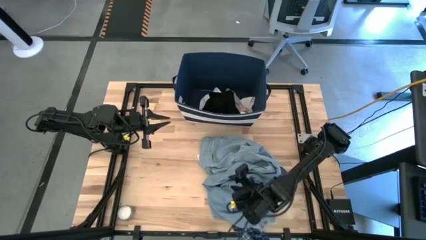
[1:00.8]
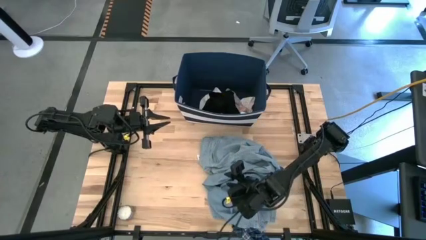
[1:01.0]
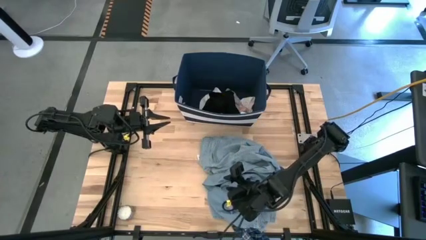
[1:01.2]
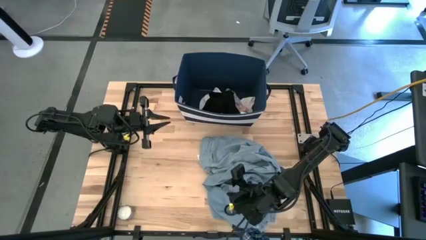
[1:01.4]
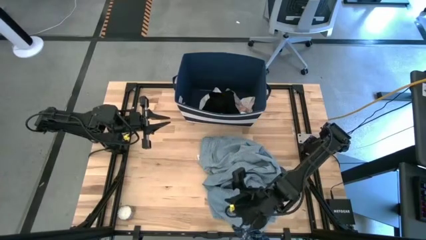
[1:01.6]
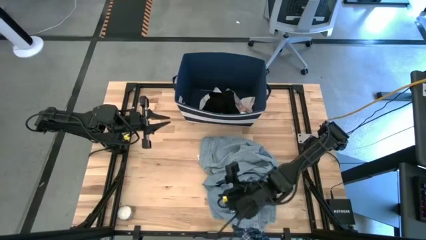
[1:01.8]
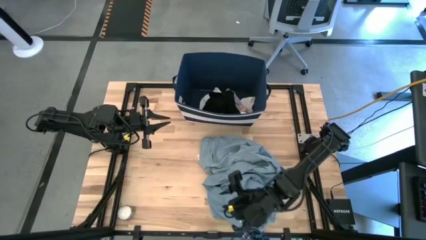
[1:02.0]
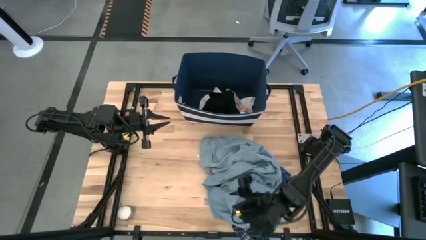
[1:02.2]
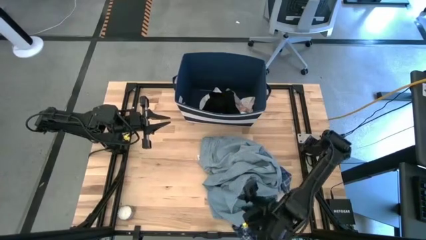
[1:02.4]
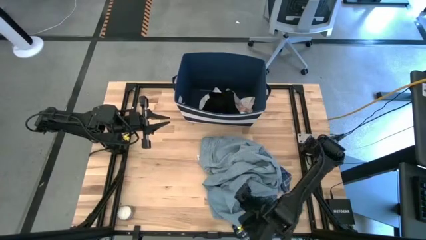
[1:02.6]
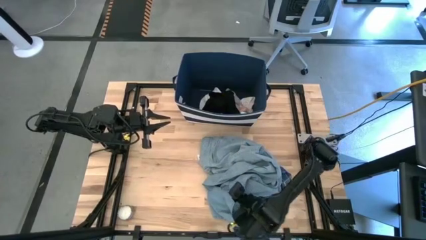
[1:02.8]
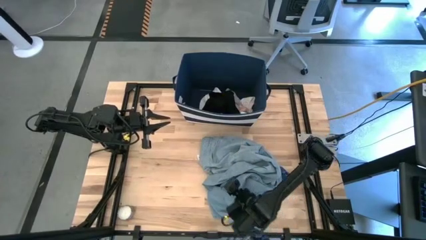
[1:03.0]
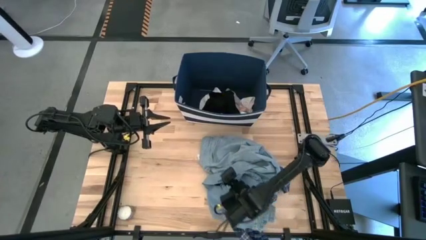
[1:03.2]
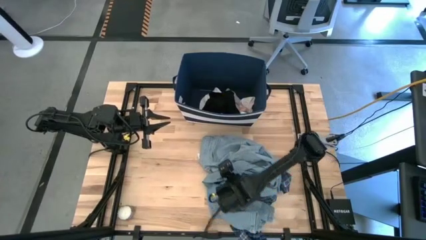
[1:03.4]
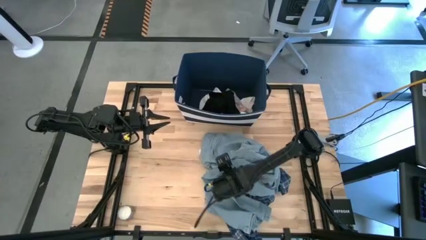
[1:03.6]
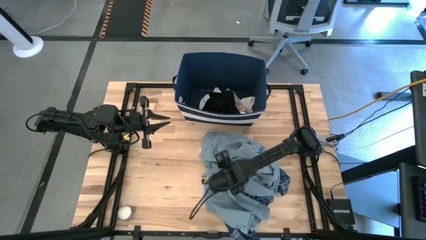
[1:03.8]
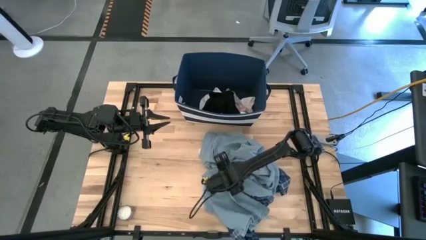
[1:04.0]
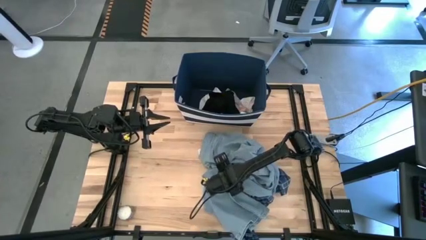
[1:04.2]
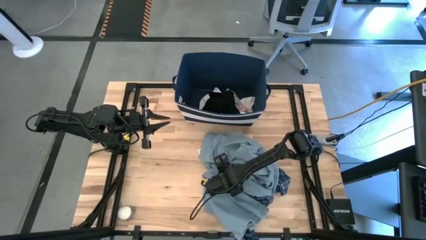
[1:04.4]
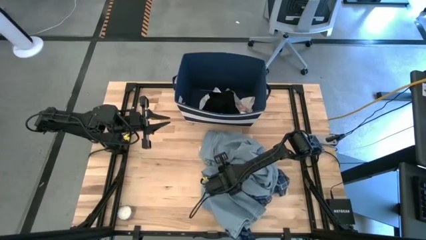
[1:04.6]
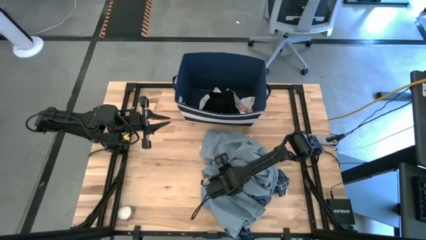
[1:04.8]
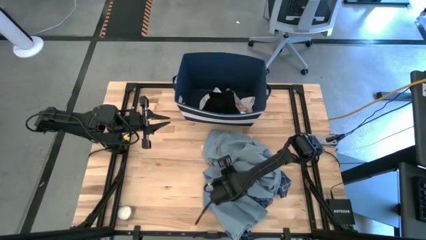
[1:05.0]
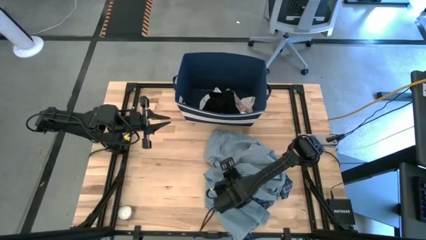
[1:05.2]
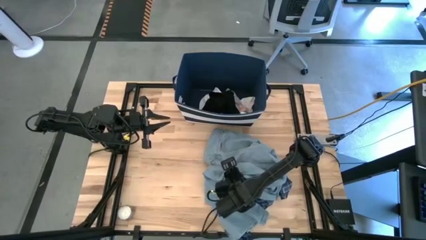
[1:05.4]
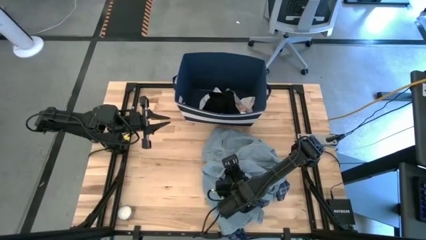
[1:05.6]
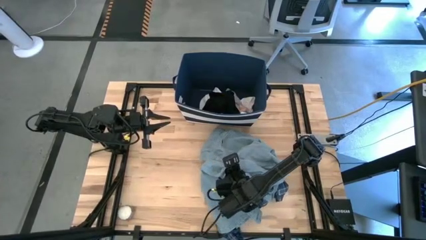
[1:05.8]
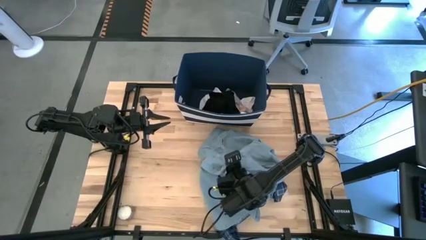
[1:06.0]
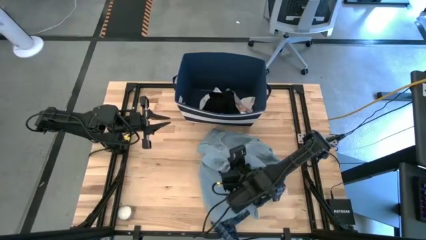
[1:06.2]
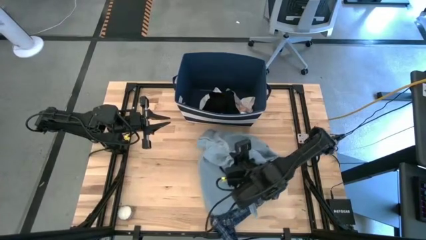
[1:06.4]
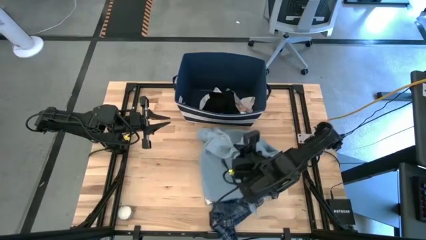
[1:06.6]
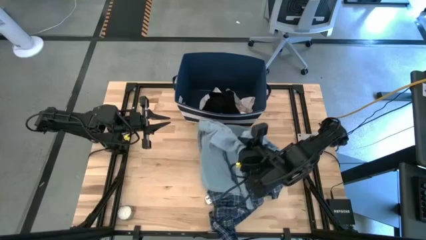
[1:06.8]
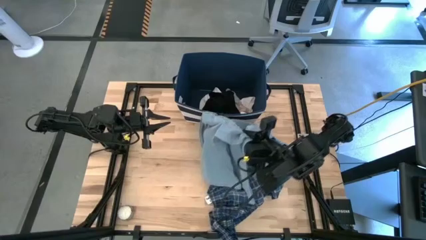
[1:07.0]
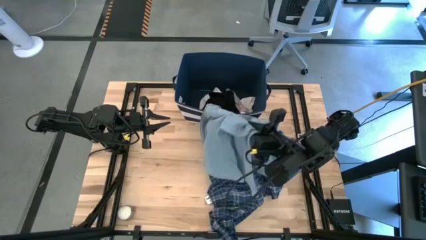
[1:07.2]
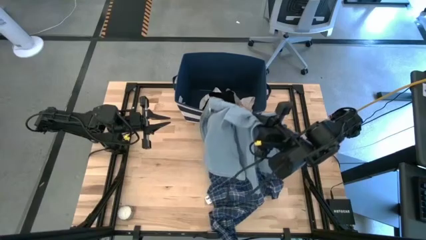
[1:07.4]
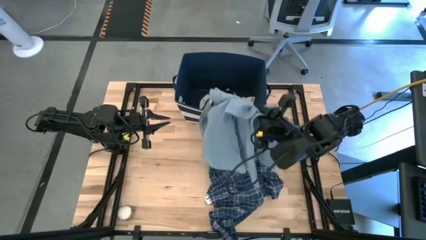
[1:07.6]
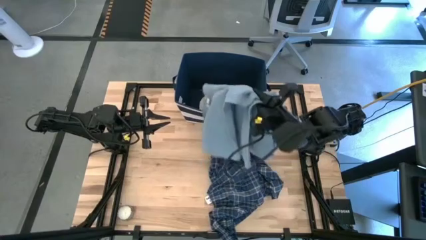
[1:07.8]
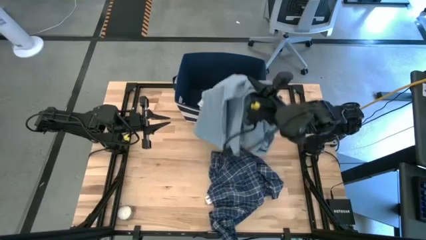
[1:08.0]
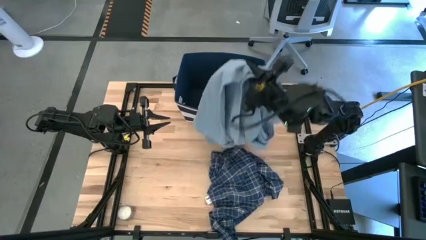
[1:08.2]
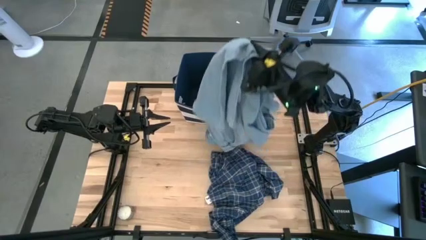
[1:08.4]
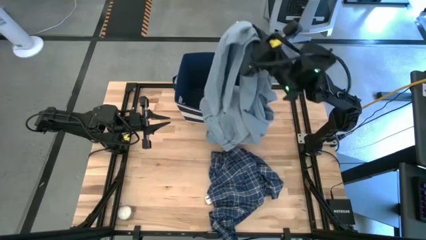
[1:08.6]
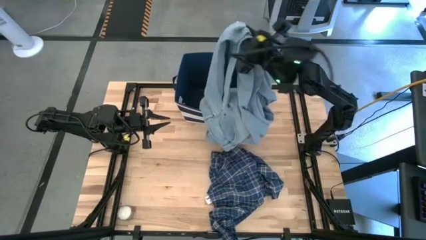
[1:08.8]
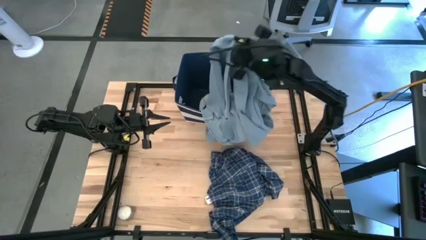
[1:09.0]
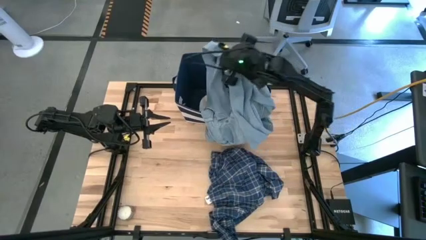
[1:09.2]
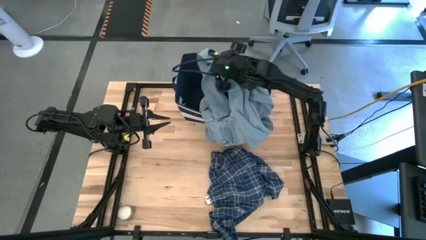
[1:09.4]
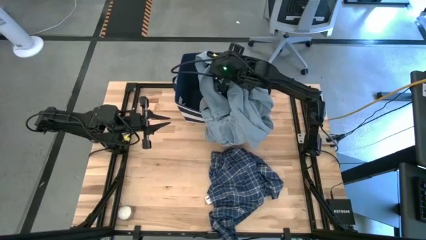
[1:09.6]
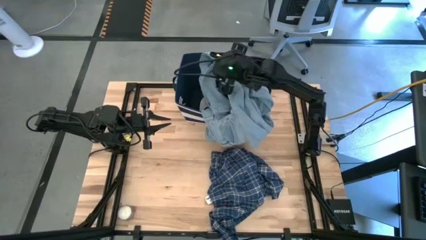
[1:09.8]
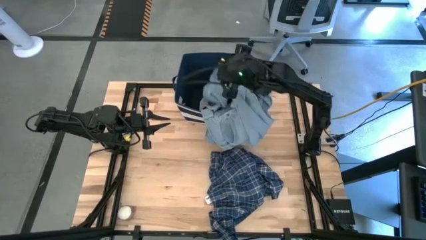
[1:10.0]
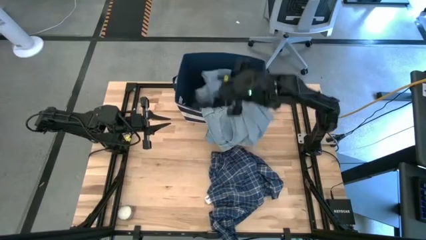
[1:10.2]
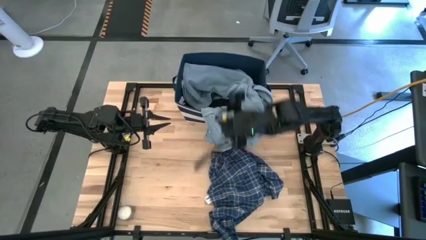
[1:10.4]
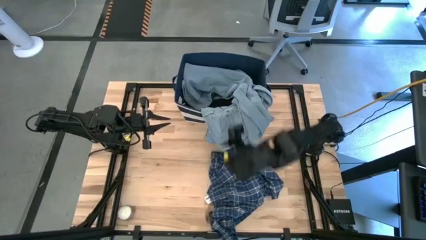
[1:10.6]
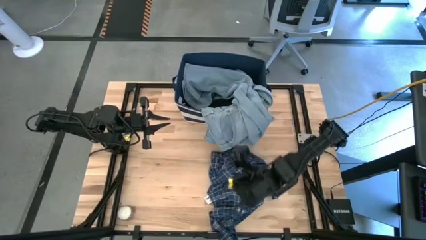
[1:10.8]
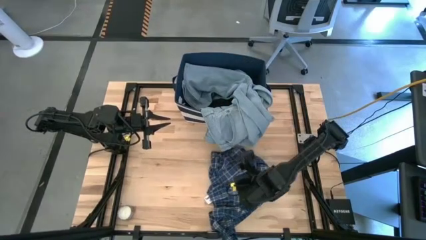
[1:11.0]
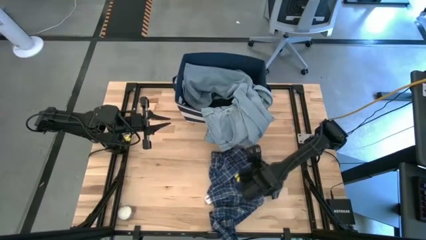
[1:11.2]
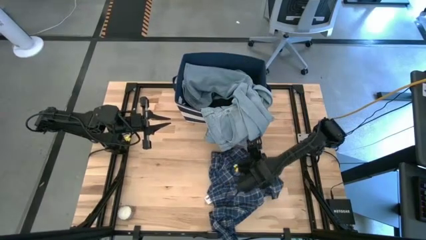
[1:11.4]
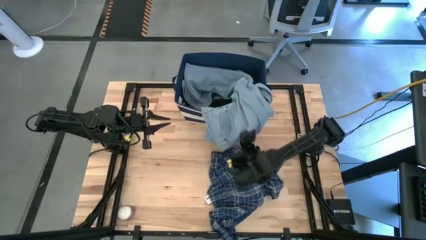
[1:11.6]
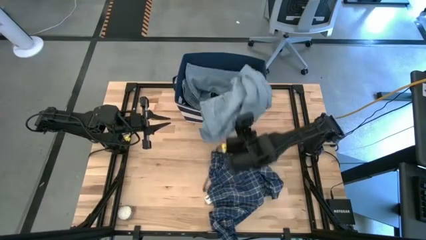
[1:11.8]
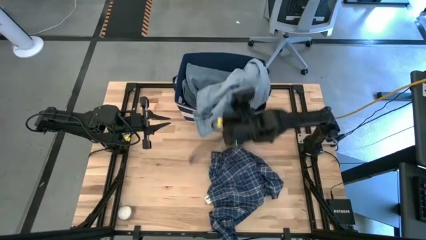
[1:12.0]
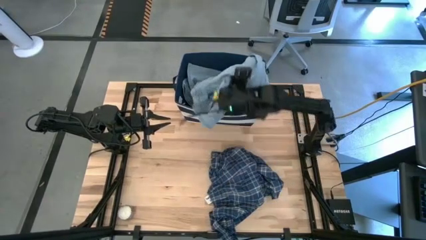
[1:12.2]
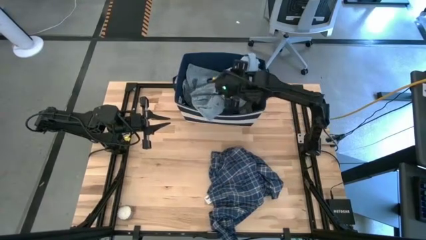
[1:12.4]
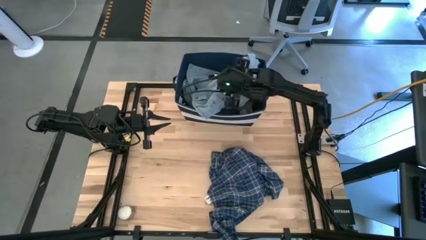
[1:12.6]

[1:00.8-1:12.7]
Task: Sort clothes
Put the blue jeans into the blue bin
